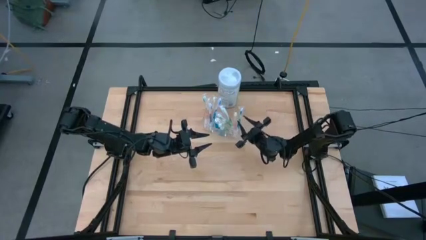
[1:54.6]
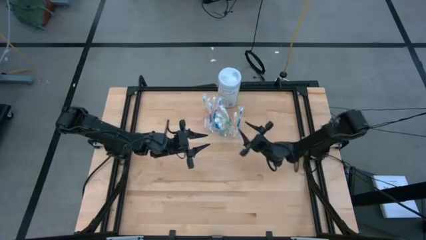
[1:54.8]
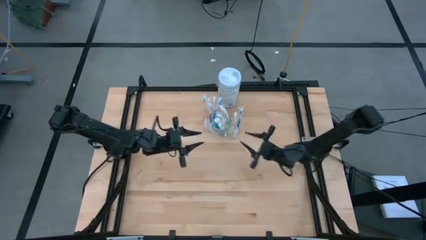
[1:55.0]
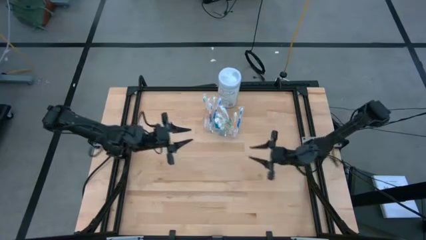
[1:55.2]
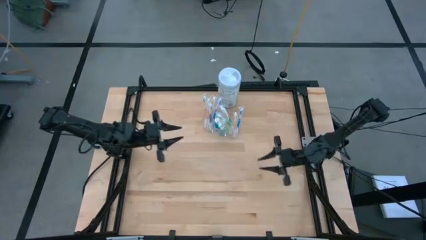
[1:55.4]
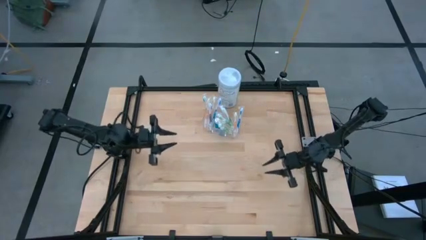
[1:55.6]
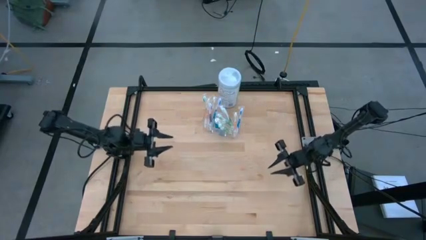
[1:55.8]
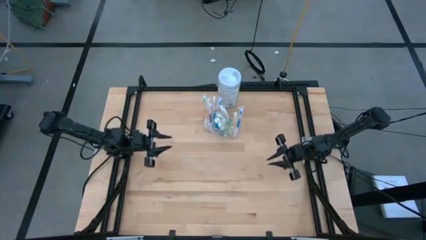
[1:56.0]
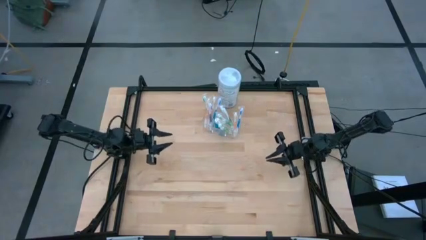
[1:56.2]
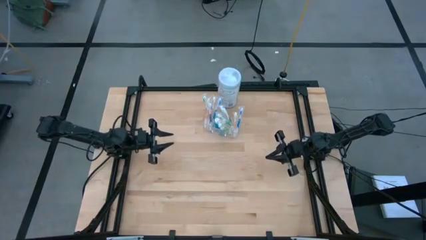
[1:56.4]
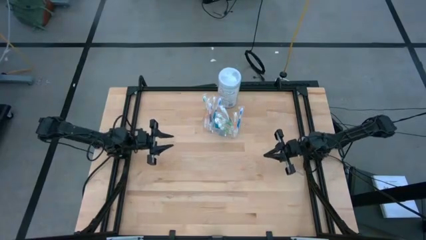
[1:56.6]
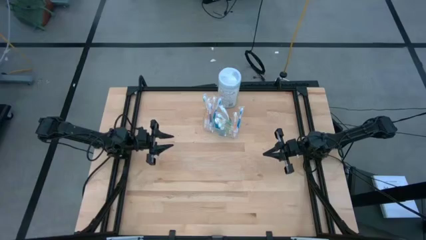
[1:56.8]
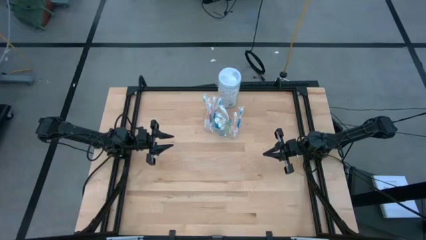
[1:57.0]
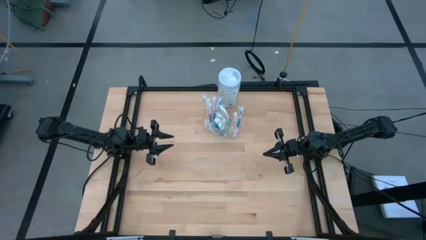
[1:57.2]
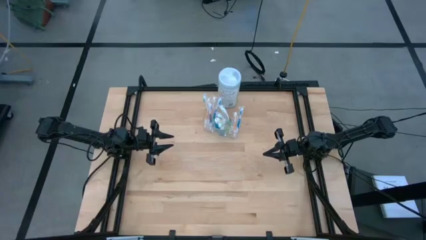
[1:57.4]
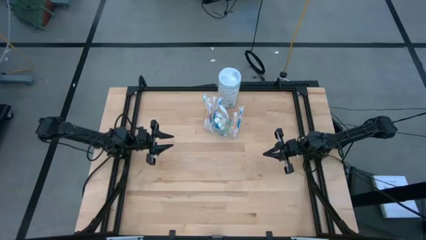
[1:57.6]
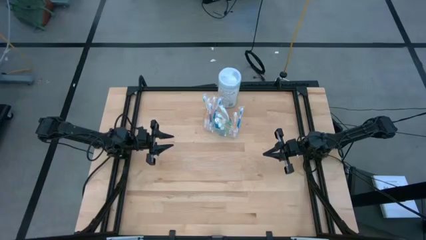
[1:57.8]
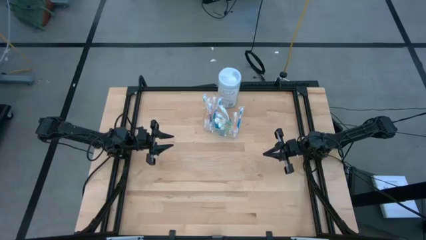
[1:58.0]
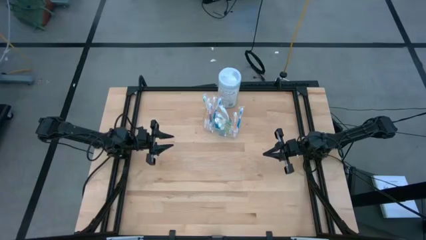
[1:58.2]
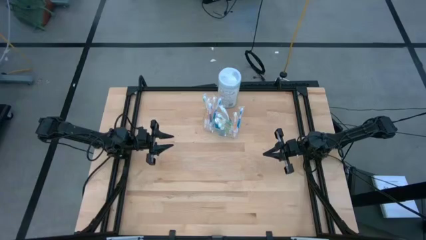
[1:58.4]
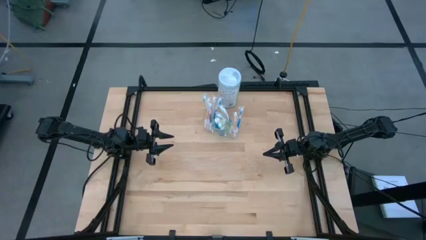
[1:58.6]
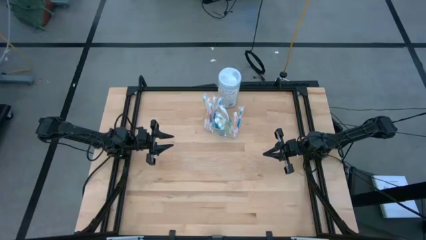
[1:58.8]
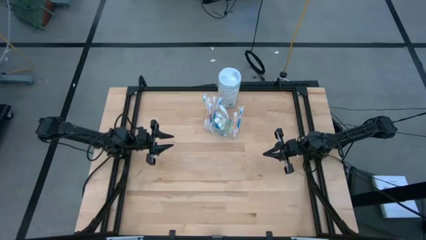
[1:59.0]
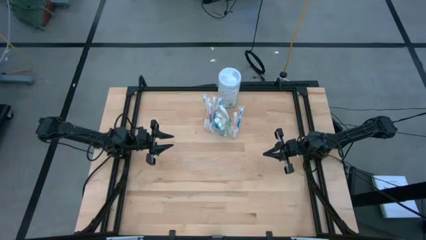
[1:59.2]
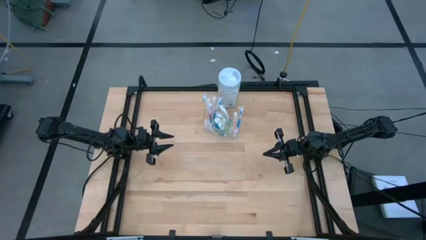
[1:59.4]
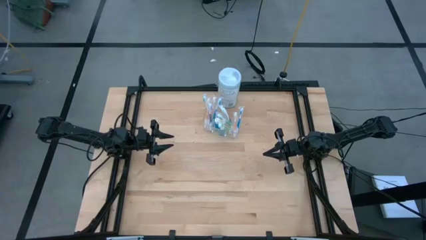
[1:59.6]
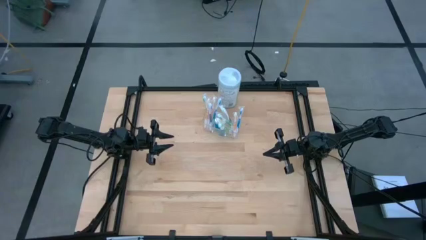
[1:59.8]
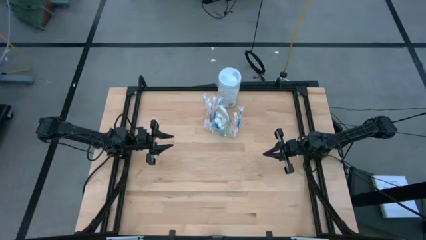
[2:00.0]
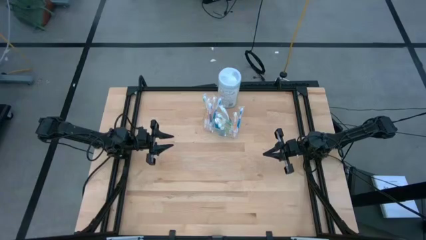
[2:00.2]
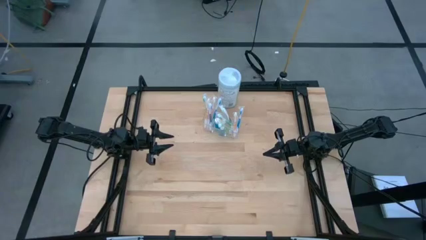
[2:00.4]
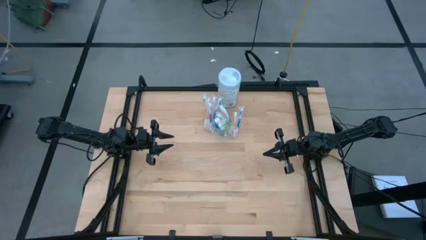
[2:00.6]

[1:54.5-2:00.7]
Task: Pick & Place toothbrushing station
Return to Home Position

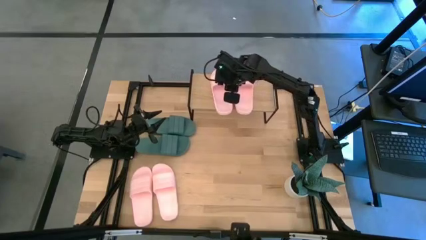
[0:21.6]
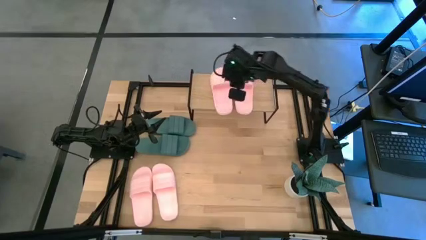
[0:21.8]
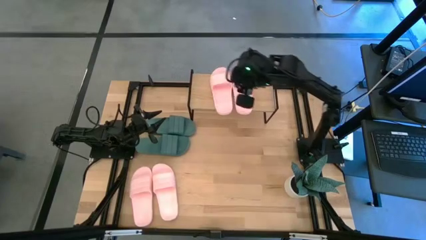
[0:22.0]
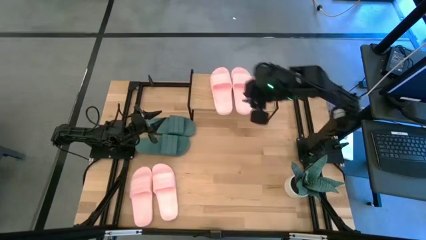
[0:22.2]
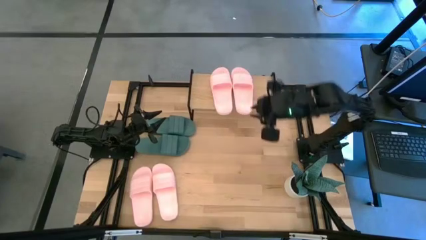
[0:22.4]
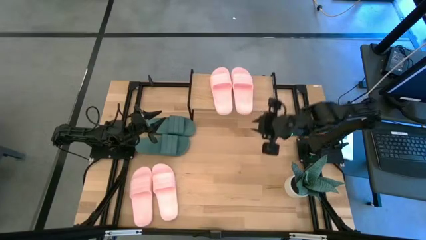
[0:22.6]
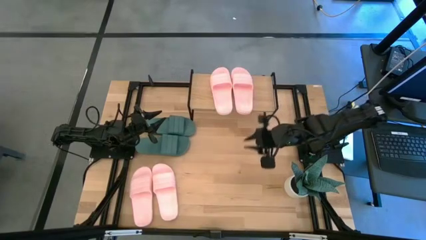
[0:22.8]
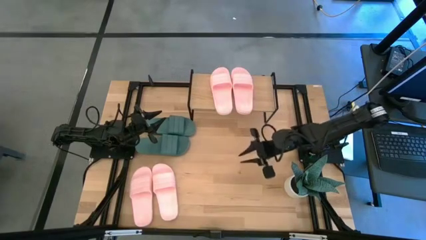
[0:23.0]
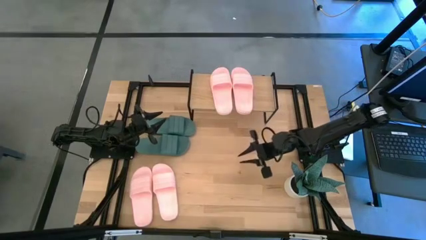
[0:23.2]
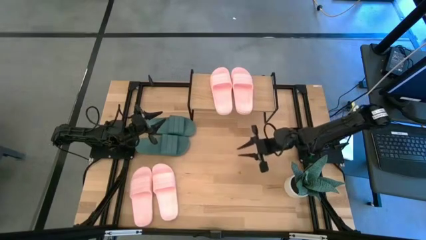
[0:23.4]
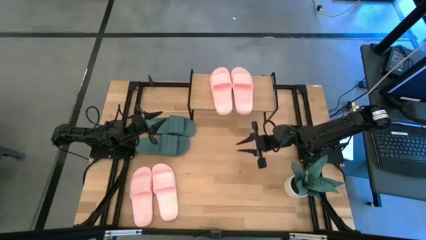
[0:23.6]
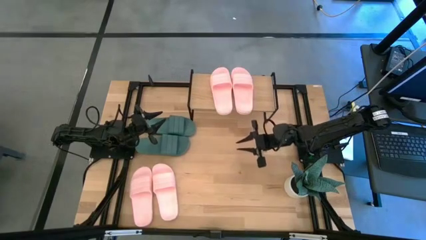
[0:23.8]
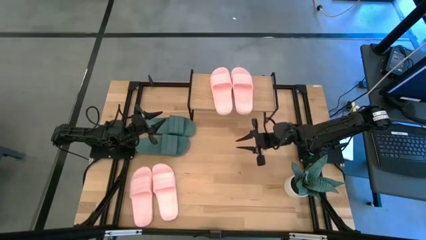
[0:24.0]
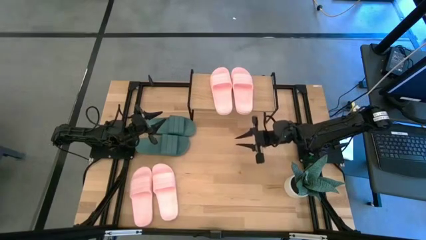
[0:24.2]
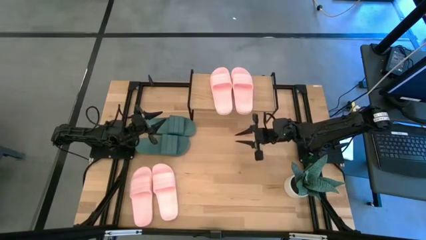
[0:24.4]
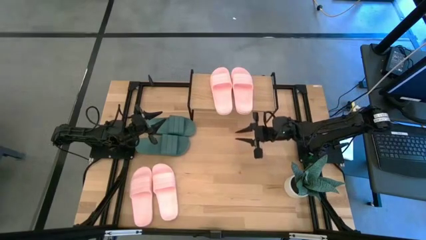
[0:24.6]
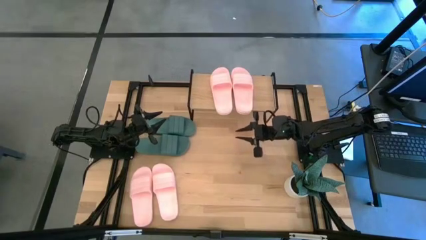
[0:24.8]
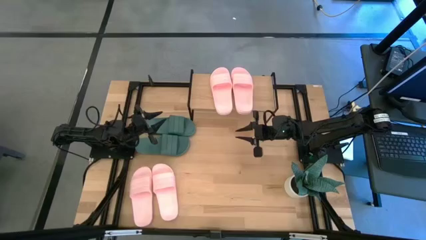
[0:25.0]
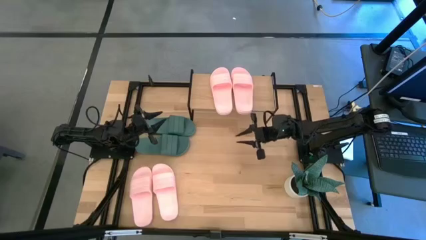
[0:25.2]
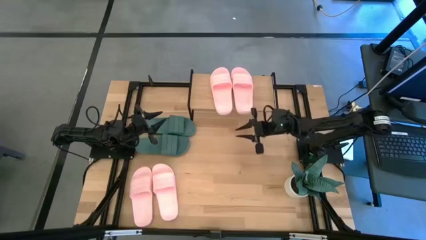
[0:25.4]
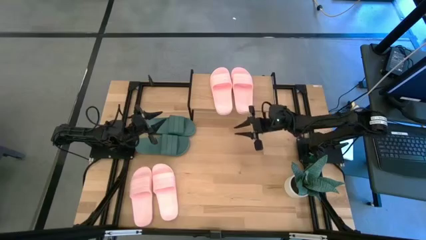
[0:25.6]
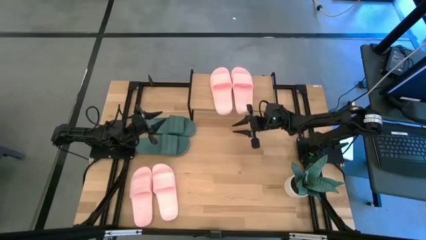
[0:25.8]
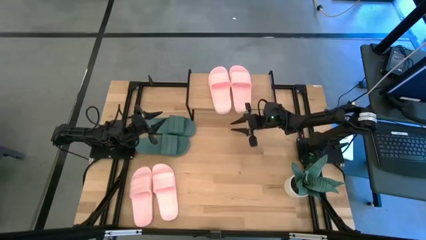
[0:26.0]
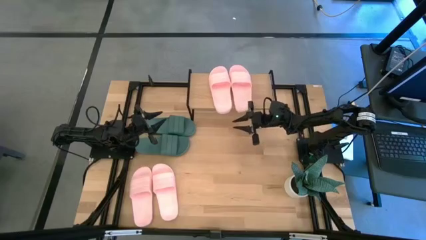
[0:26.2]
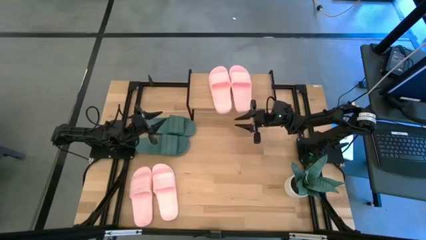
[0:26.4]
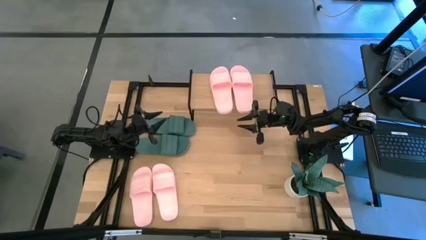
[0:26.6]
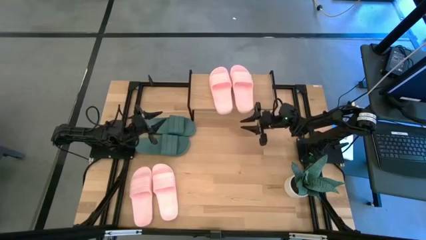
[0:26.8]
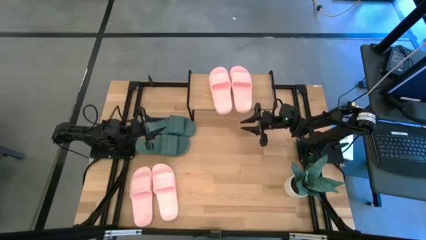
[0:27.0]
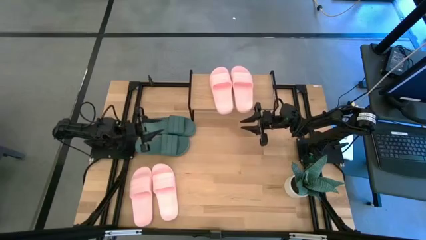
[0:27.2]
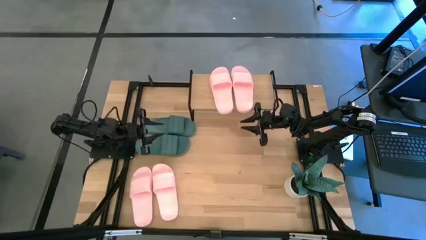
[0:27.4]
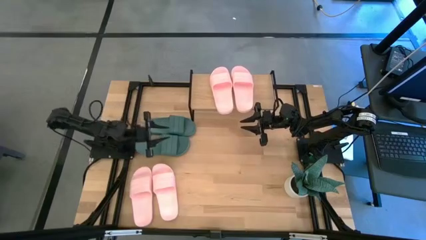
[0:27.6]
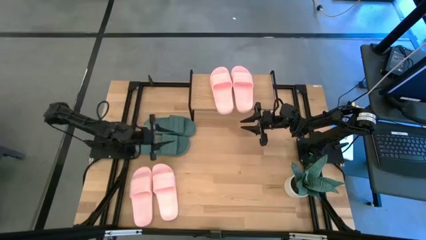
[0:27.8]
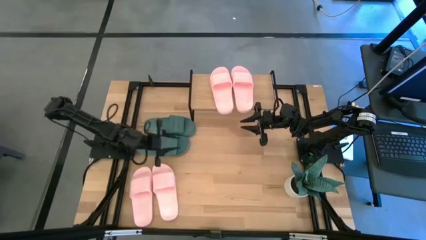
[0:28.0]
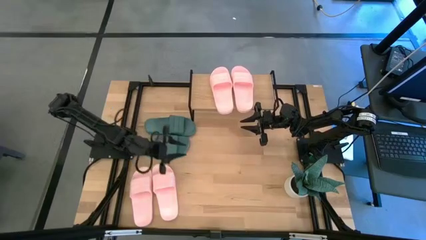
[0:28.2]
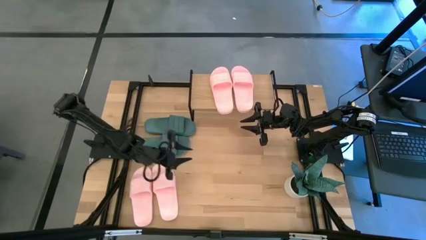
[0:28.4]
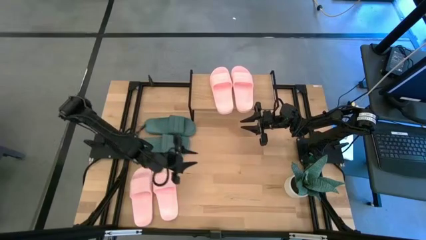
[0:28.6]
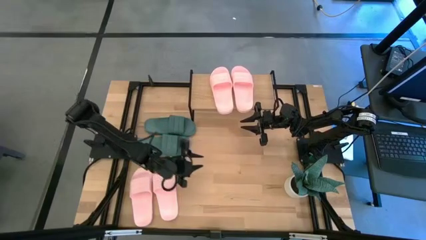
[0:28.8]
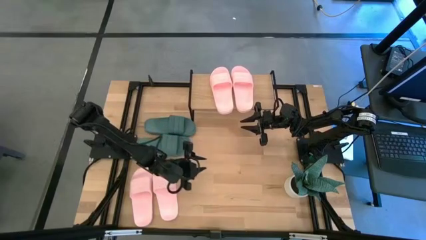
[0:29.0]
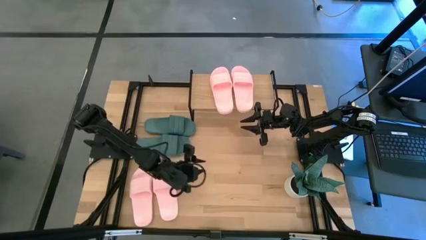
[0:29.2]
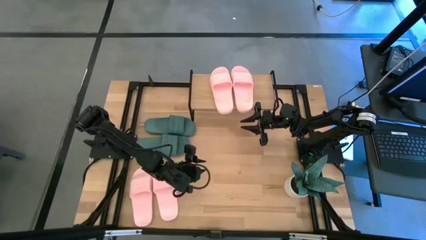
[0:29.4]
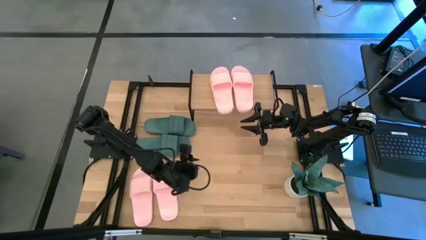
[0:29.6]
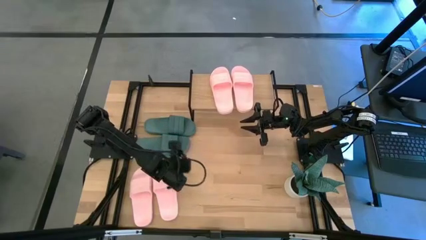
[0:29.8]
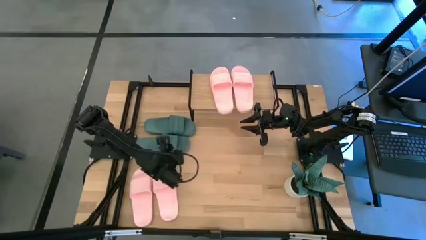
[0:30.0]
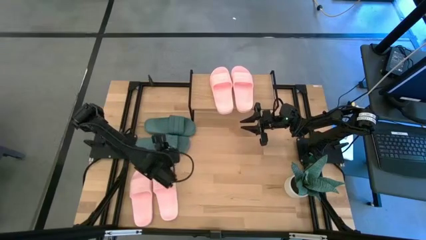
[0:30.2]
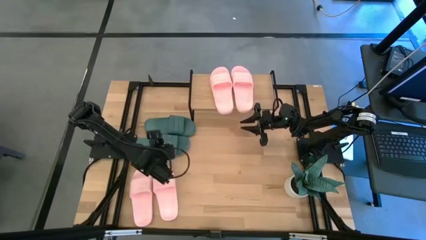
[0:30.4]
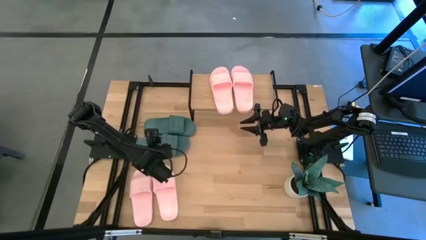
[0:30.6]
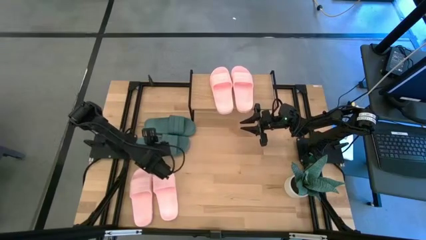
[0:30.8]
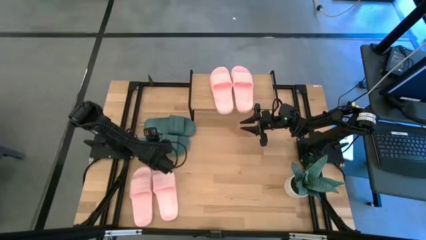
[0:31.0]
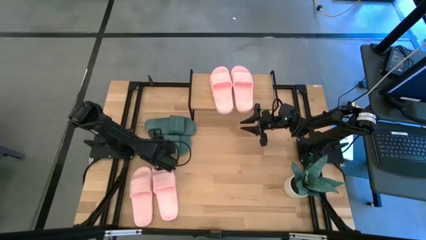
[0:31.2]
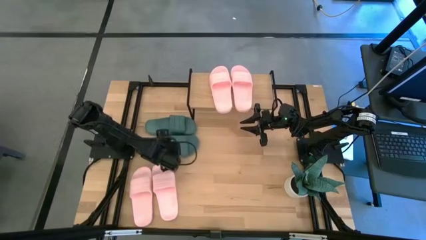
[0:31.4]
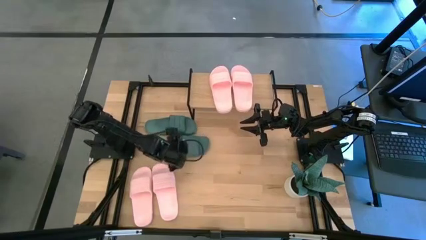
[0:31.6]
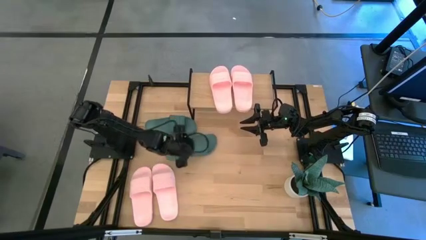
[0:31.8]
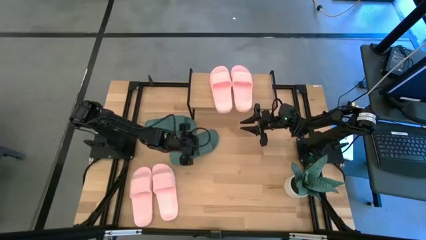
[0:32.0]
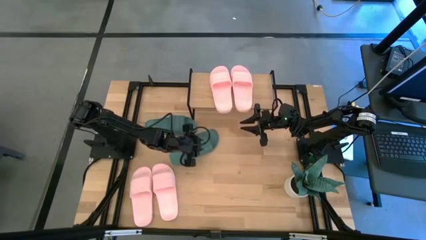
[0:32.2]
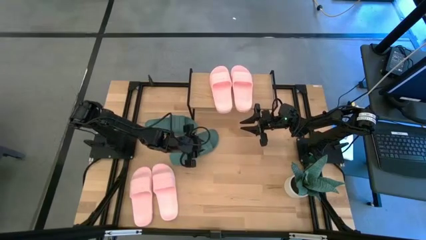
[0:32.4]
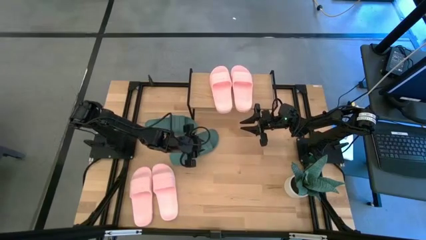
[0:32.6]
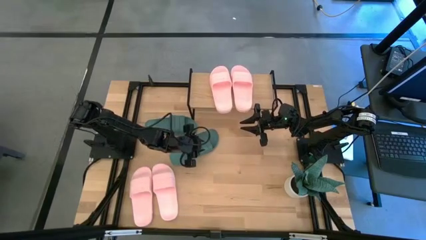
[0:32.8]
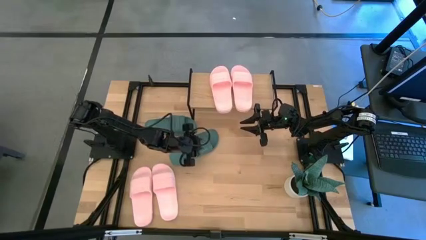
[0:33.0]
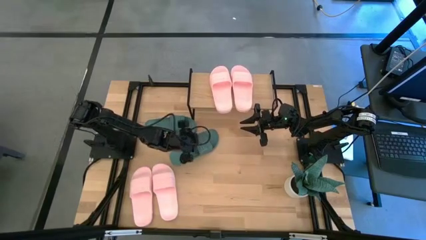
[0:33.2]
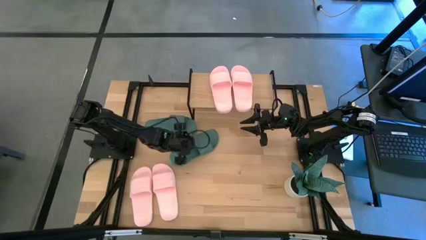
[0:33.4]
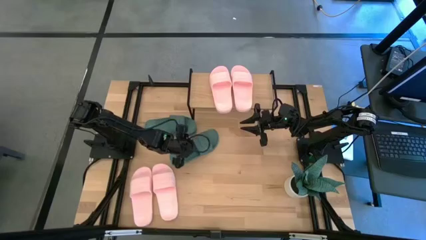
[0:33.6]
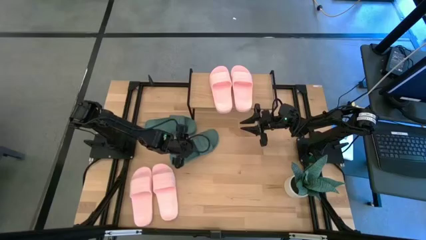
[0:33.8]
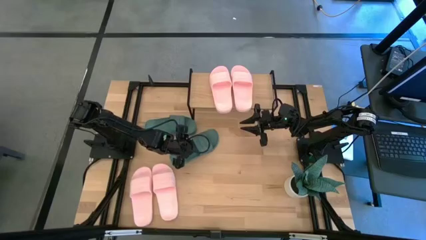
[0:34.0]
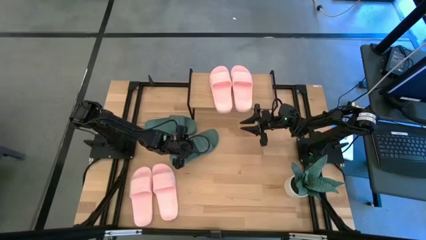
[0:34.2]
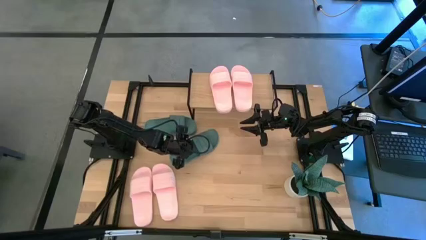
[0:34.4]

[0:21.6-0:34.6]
Task: Pick and place slides into the shelf
Put the green slipper under the shelf
